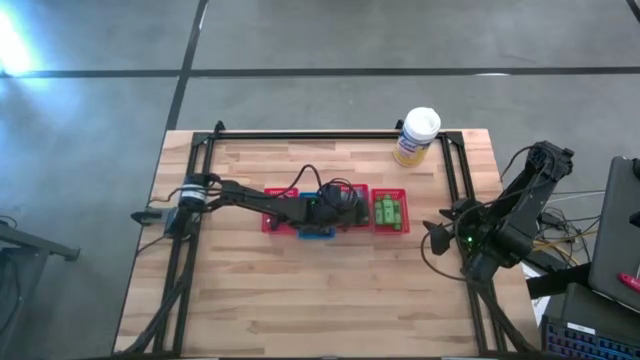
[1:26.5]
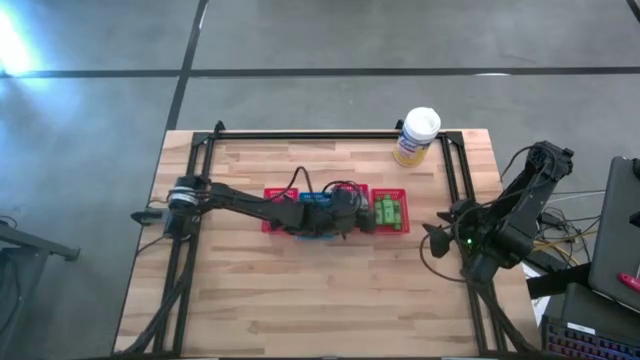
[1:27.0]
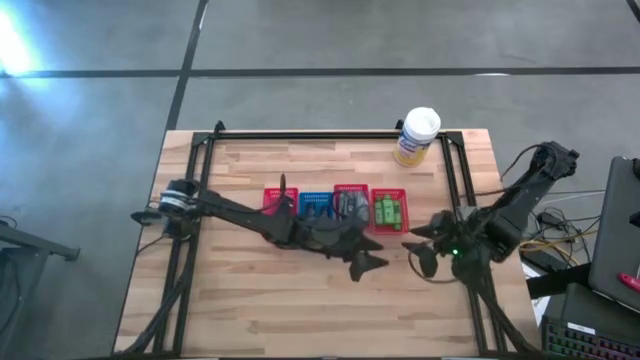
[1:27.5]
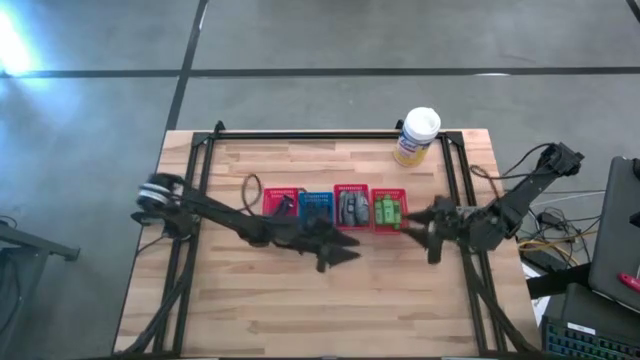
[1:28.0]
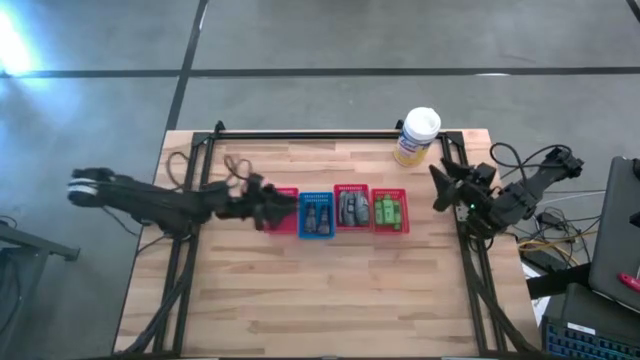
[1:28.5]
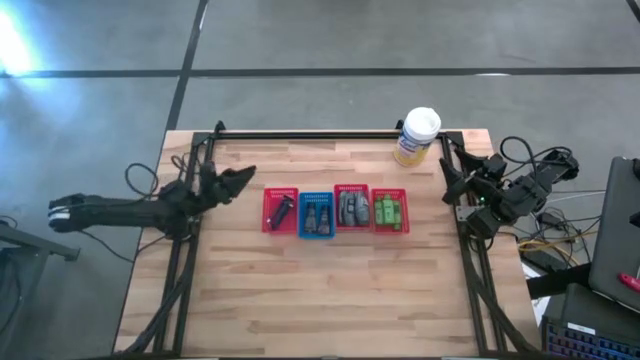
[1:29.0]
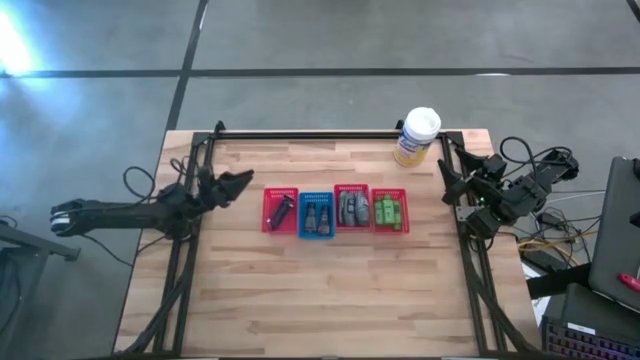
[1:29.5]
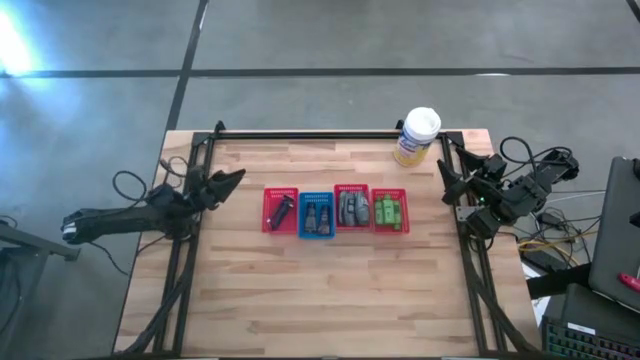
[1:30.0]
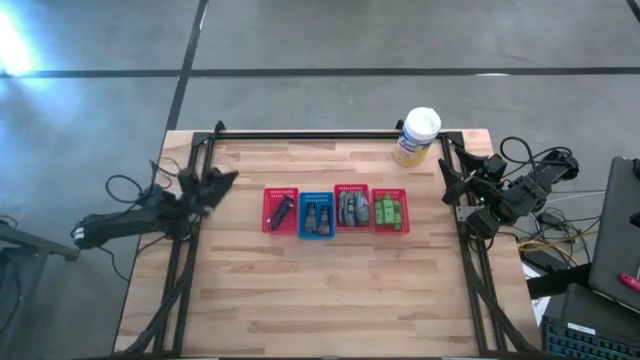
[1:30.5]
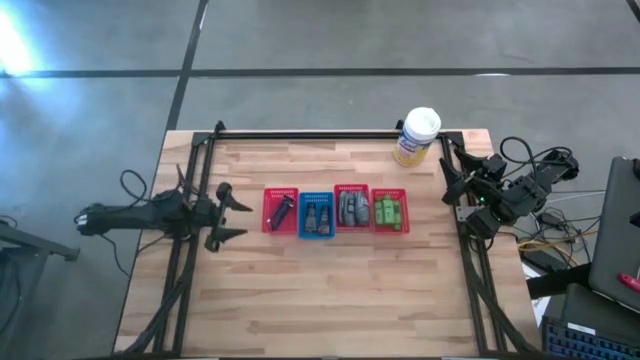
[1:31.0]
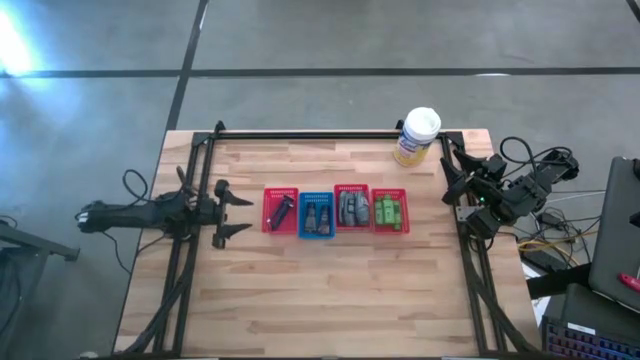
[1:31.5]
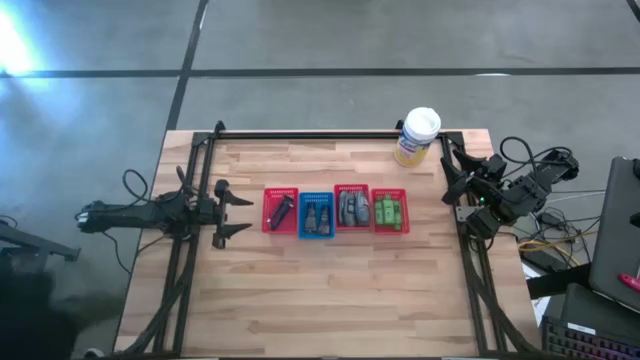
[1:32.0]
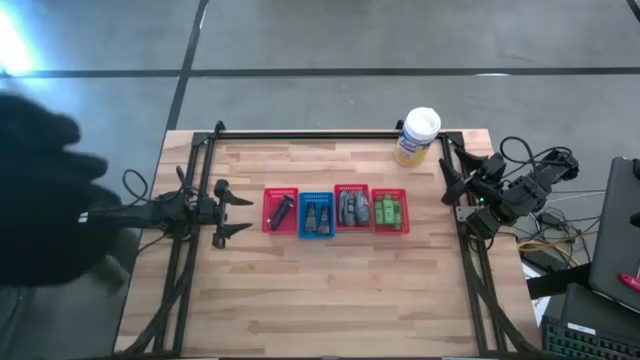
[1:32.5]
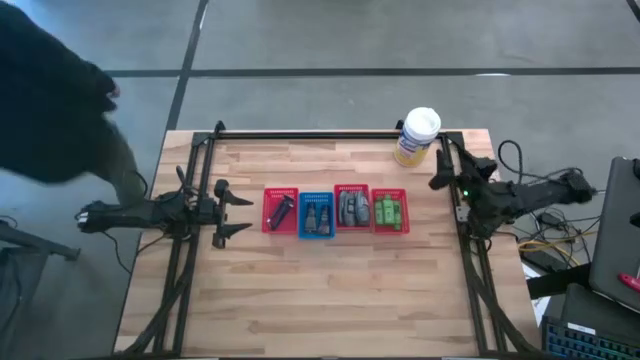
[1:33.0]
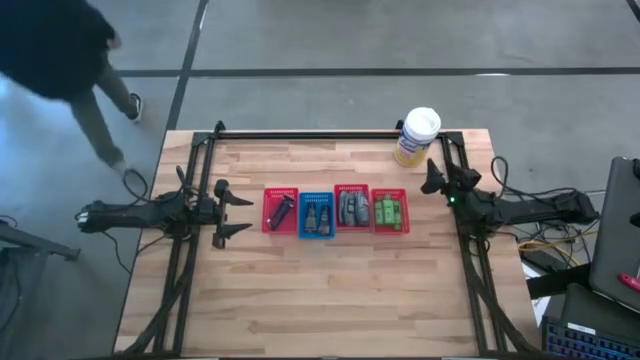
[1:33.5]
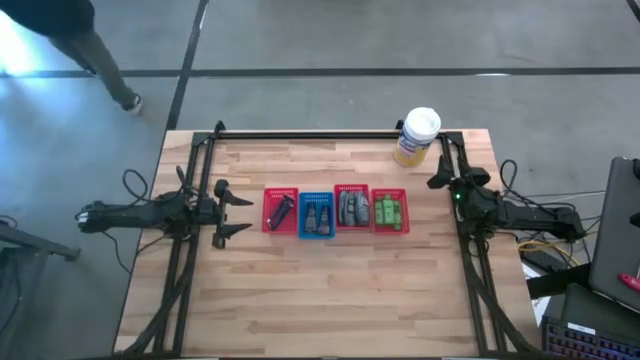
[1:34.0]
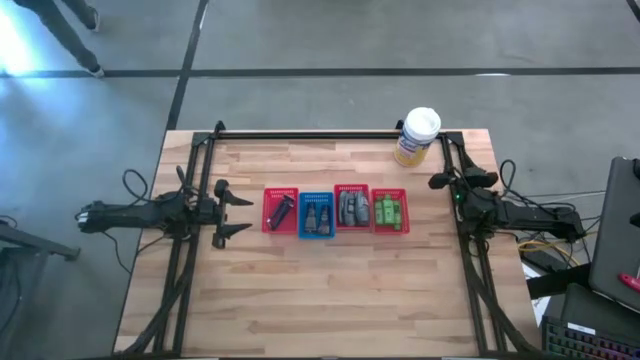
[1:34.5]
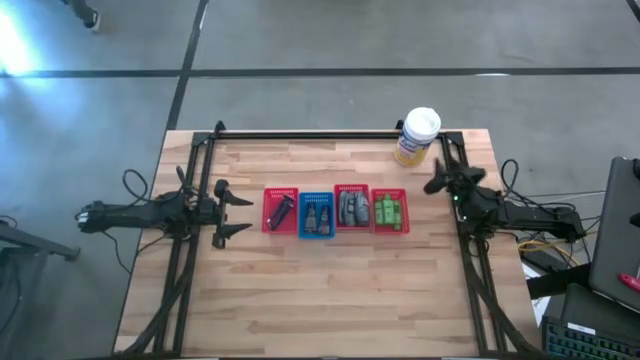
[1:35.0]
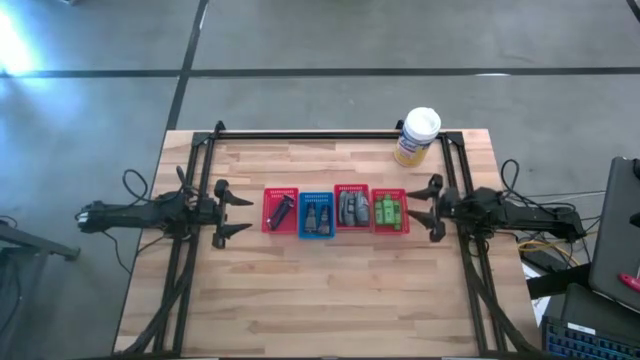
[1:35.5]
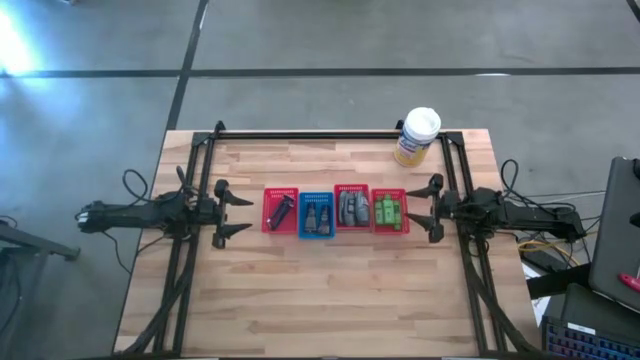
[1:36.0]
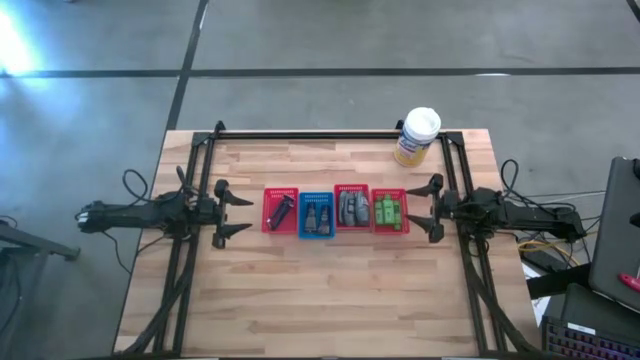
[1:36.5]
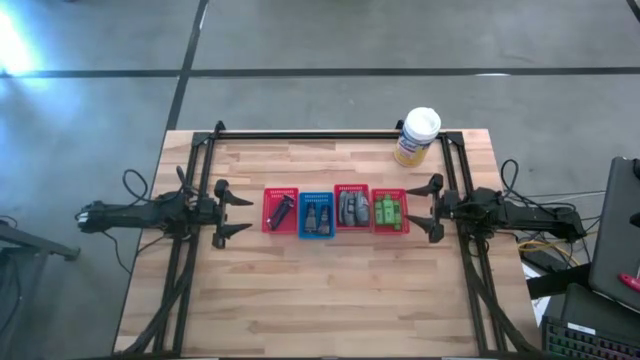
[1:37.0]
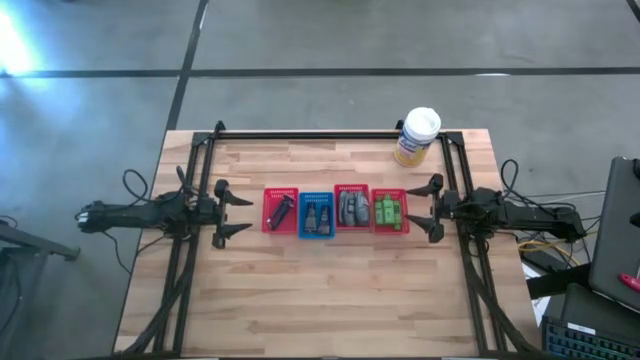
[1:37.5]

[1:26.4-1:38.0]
Task: Pick & Place Travel size toiletries
Return to Home Position

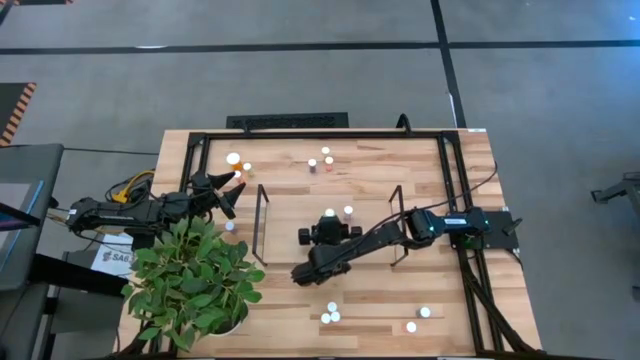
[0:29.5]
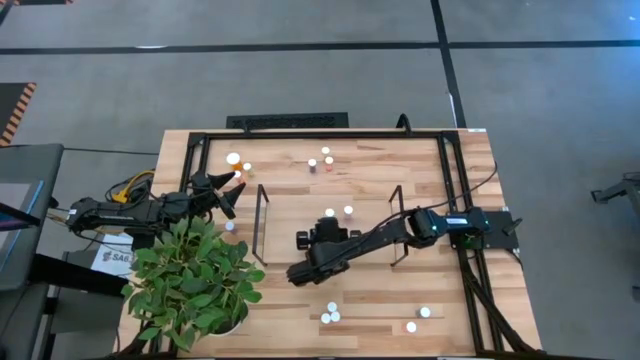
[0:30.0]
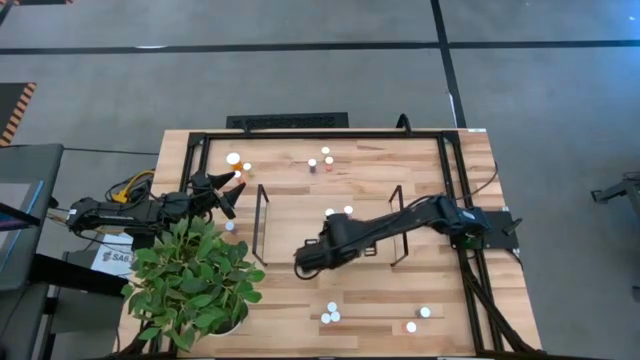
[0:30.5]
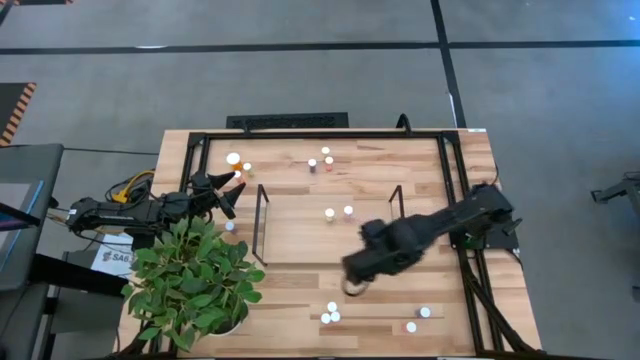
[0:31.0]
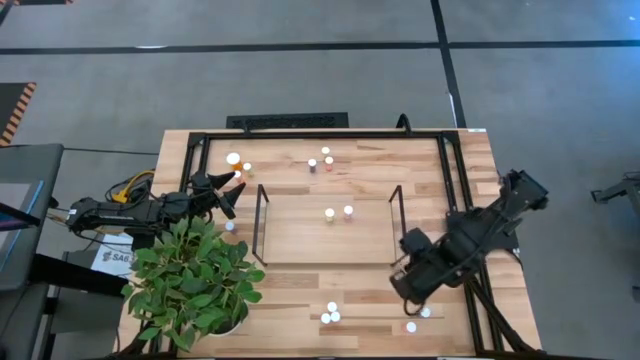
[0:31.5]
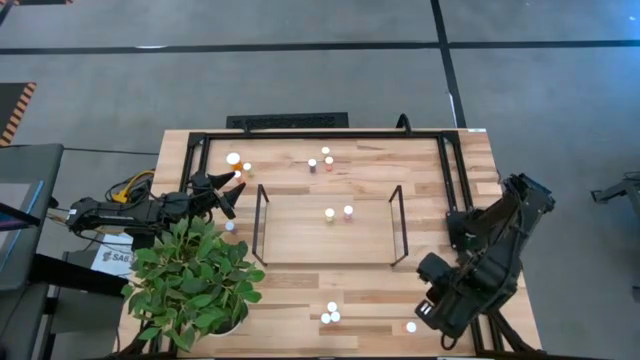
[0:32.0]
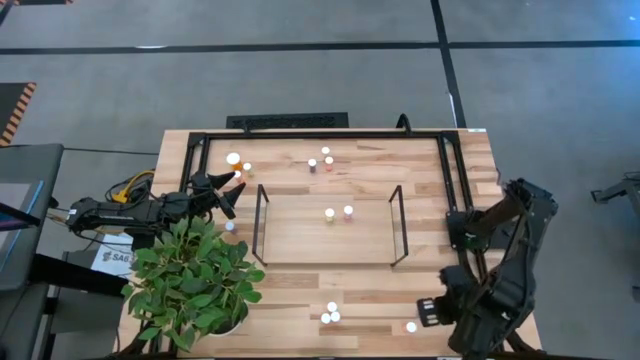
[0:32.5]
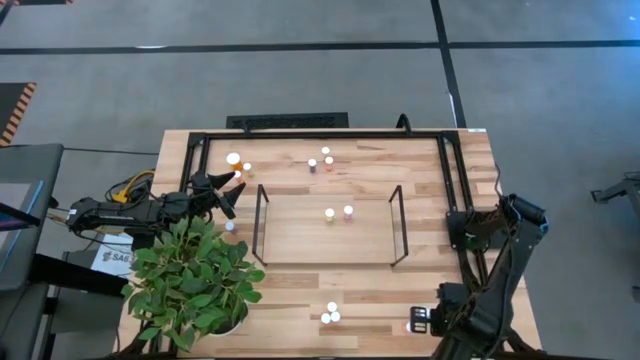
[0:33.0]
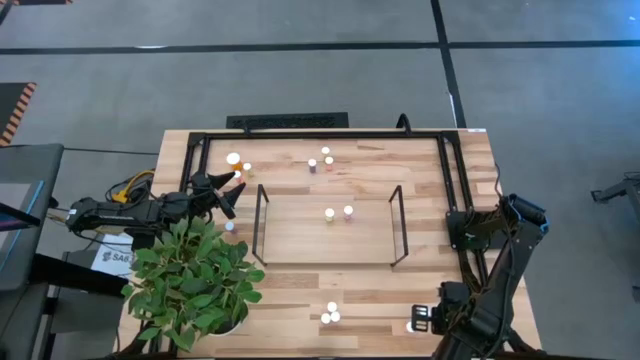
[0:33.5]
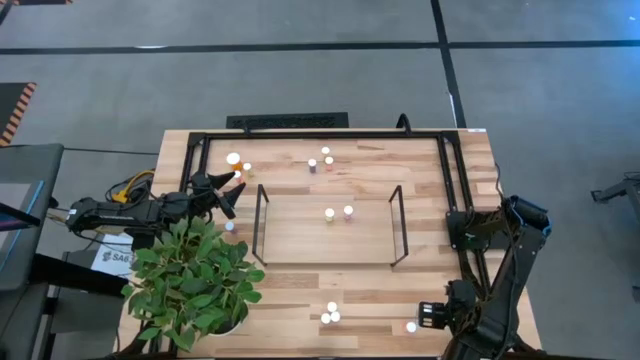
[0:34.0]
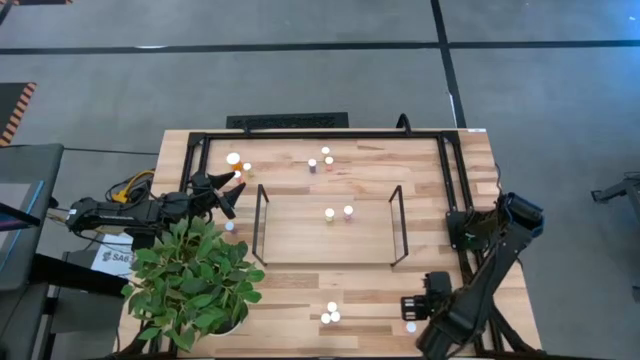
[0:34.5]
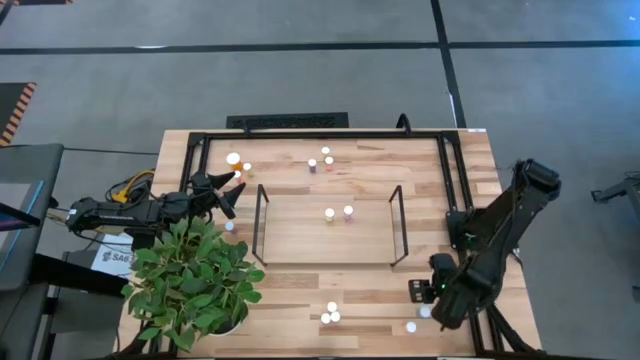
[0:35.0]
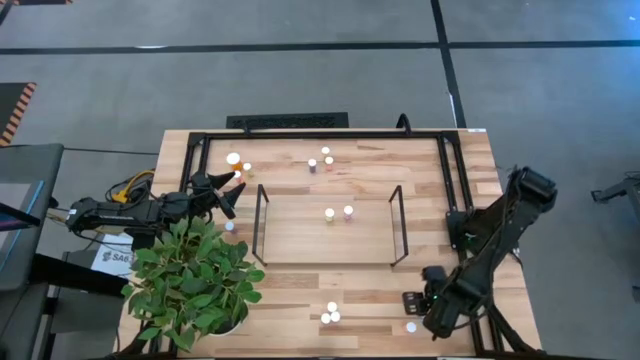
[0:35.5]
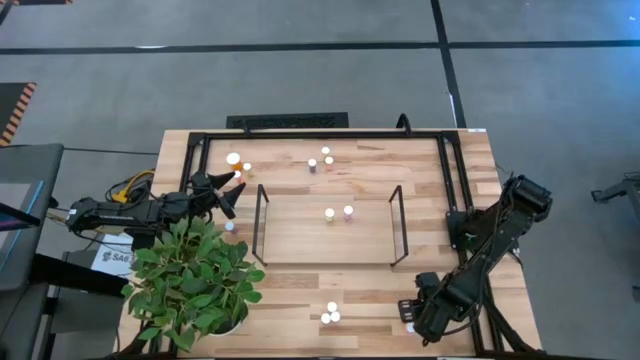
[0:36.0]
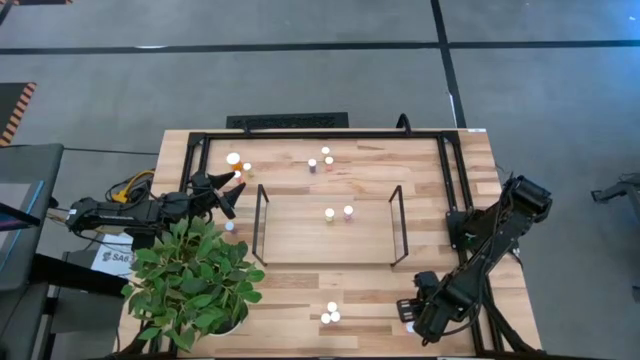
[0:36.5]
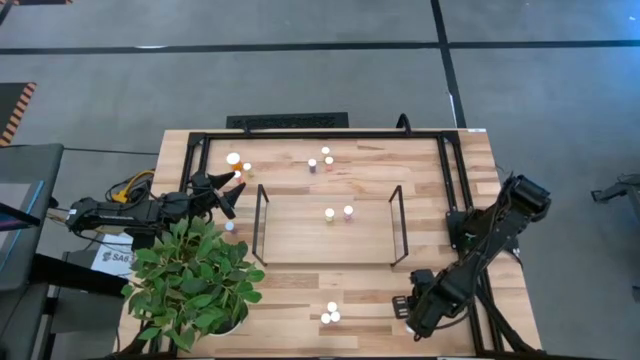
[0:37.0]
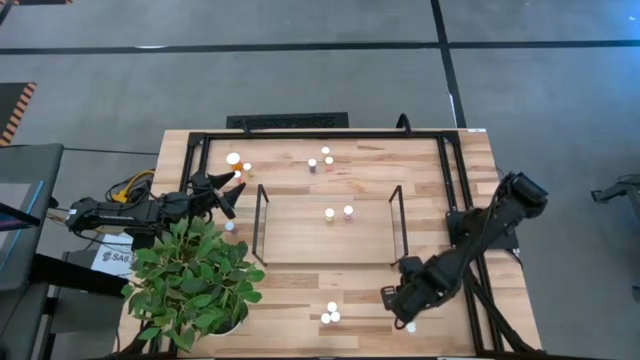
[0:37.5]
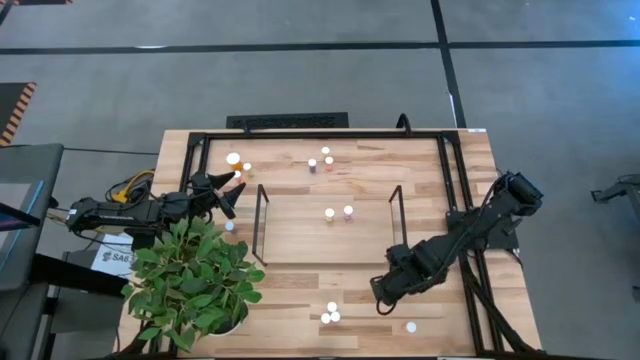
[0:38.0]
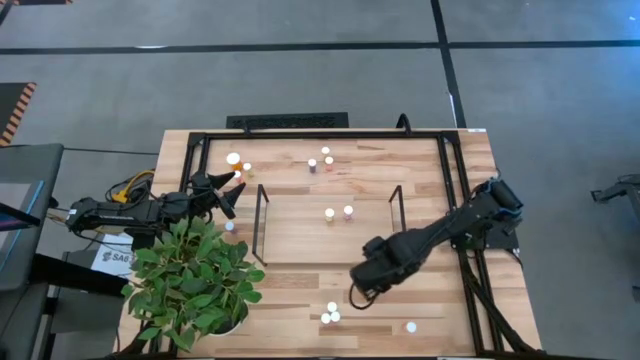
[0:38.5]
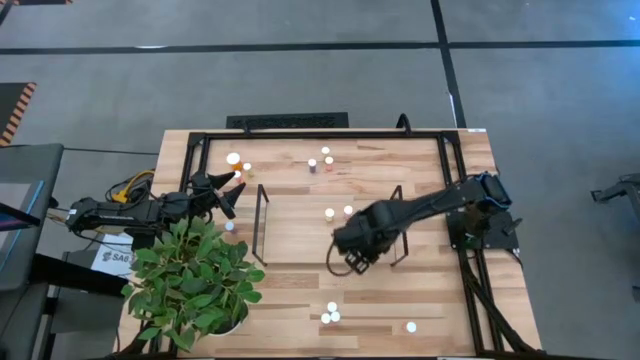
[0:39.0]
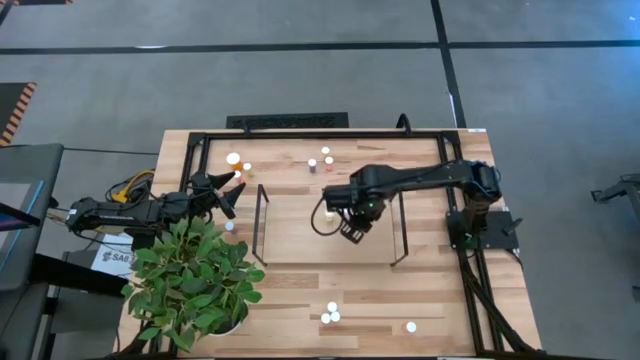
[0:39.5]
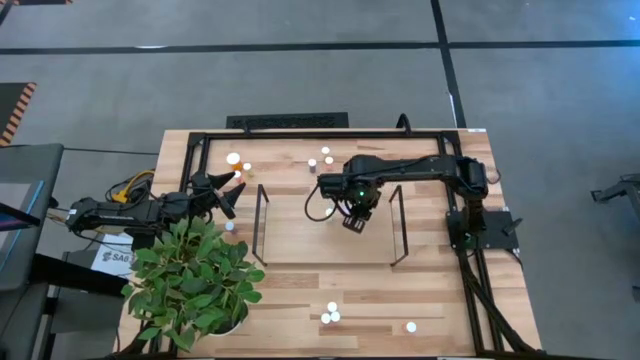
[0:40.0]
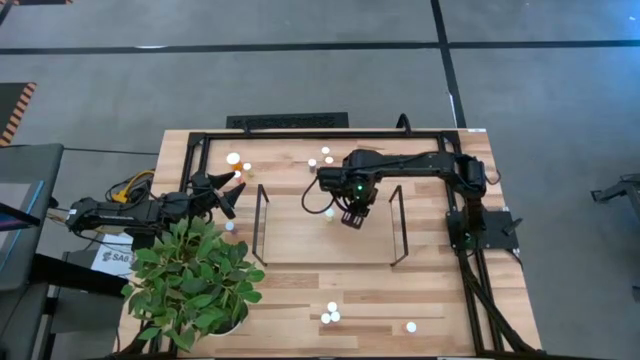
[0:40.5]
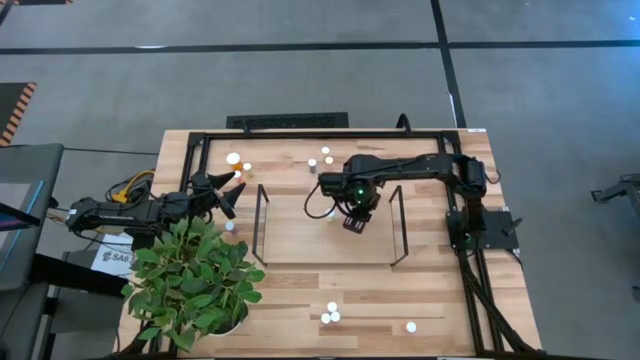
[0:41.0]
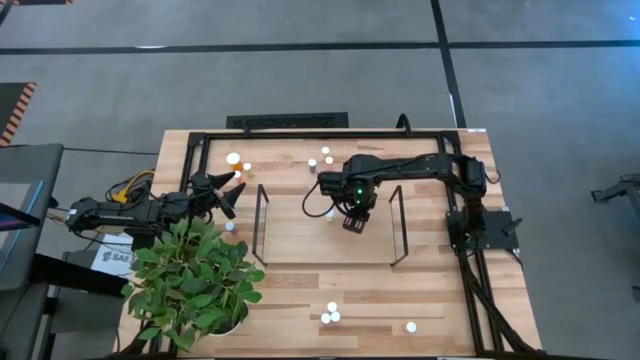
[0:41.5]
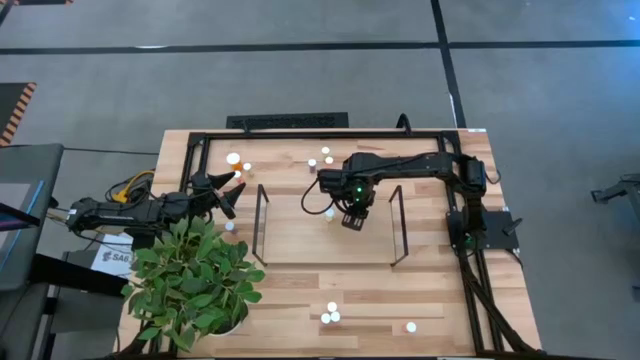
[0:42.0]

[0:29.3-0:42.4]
Task: Pick and place medicine bottles onto shelf by color
Put the blue pill bottle on the shelf
